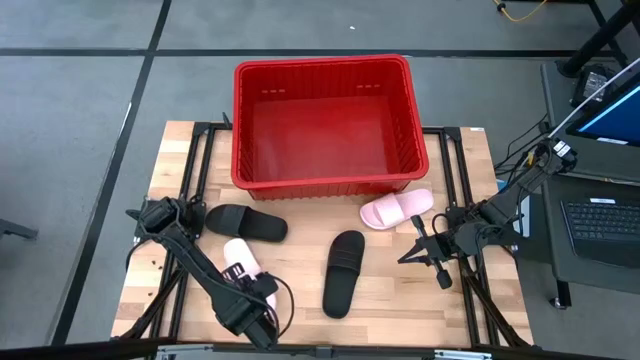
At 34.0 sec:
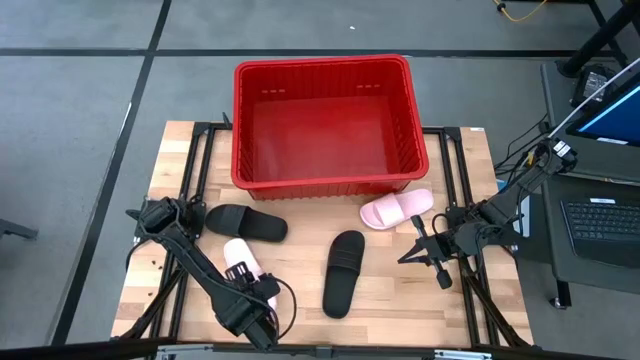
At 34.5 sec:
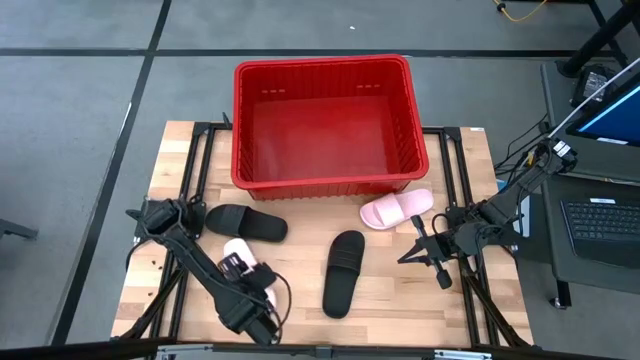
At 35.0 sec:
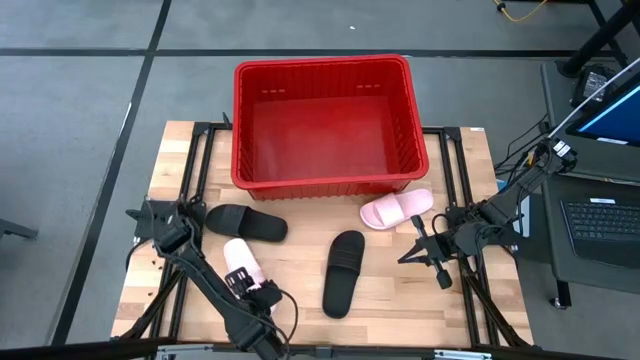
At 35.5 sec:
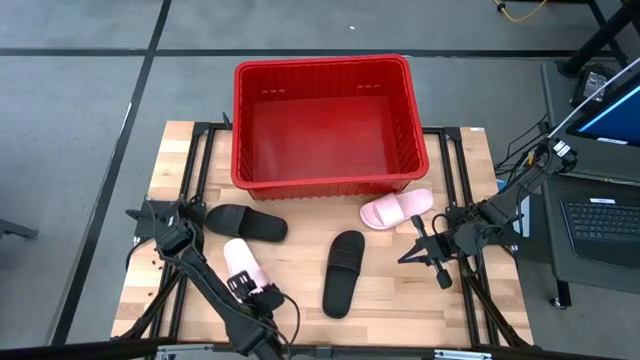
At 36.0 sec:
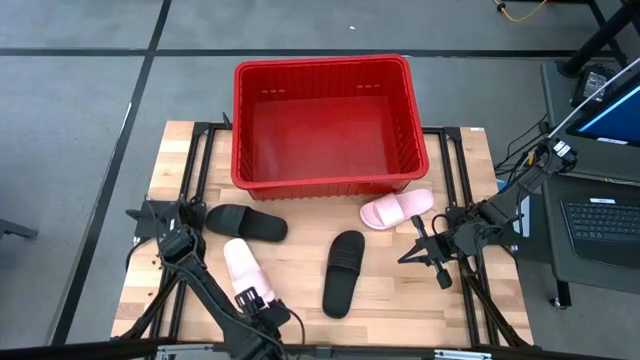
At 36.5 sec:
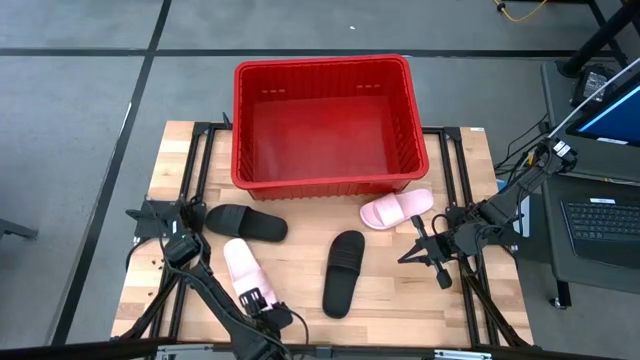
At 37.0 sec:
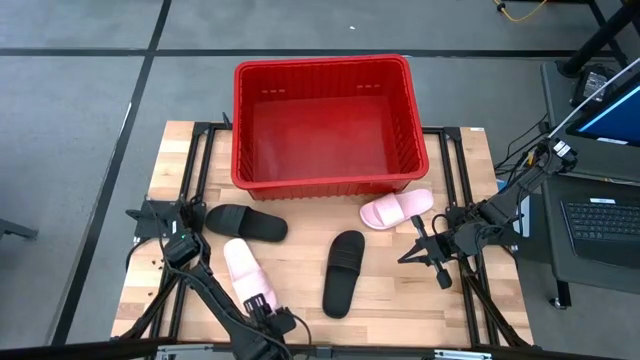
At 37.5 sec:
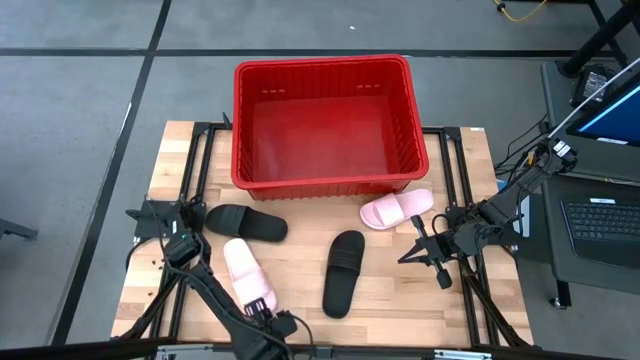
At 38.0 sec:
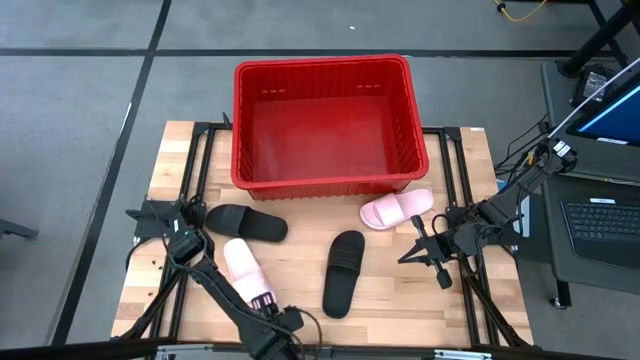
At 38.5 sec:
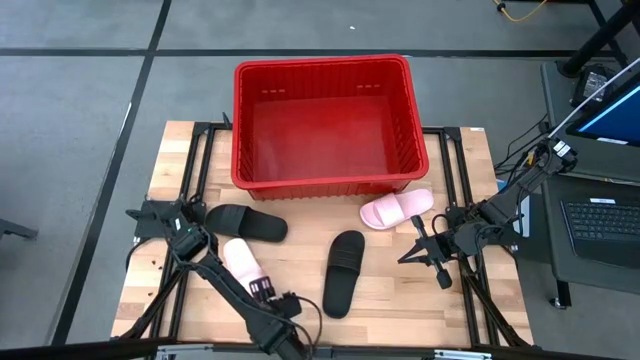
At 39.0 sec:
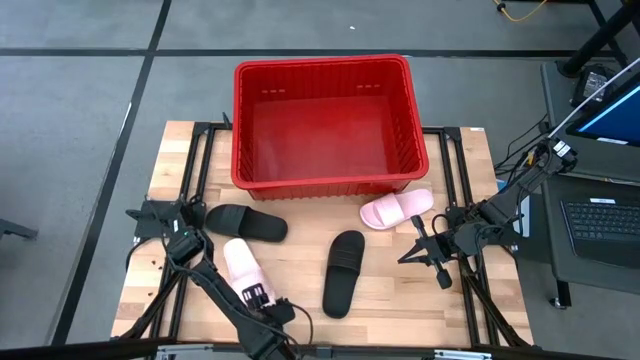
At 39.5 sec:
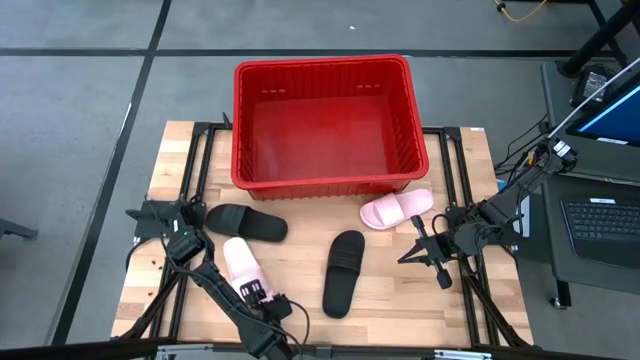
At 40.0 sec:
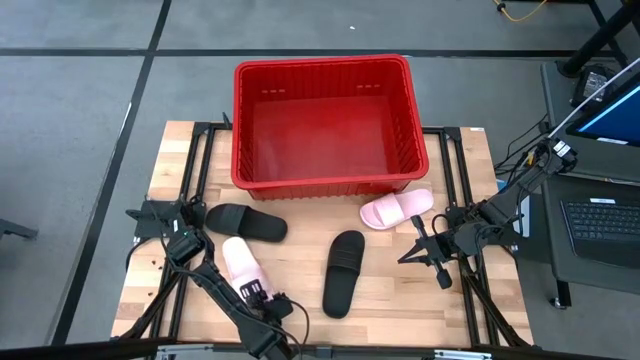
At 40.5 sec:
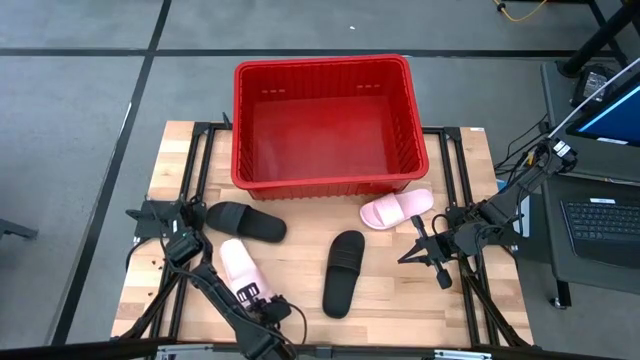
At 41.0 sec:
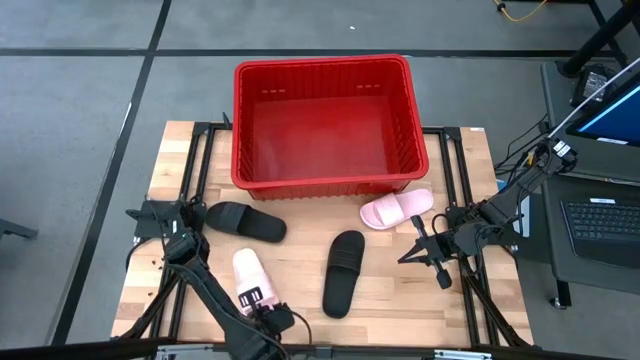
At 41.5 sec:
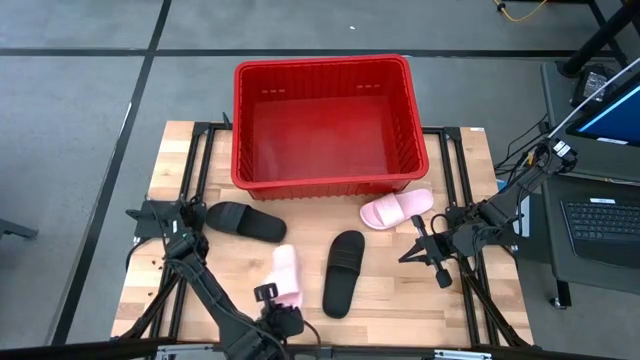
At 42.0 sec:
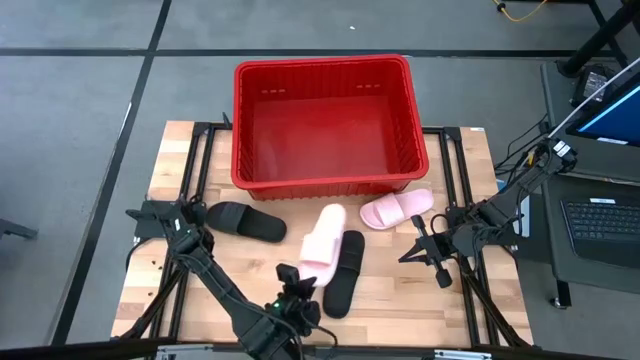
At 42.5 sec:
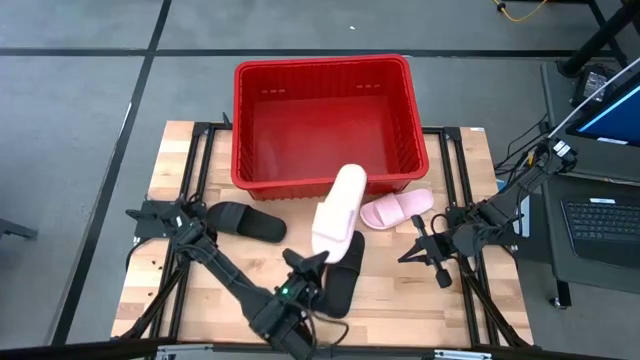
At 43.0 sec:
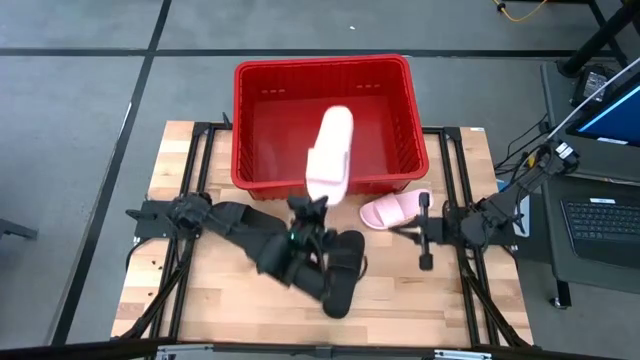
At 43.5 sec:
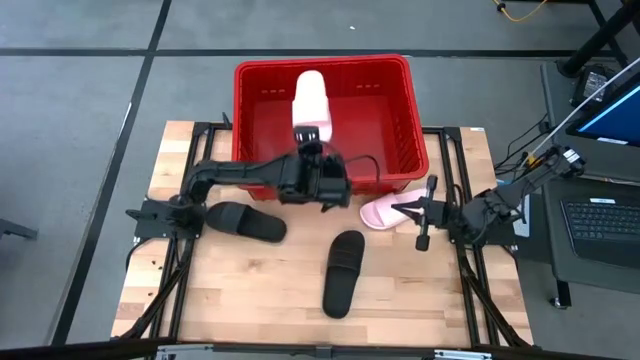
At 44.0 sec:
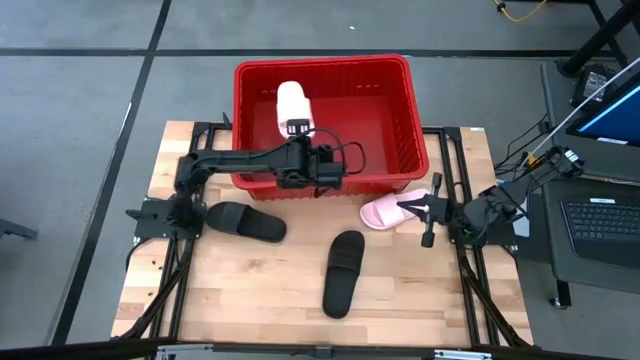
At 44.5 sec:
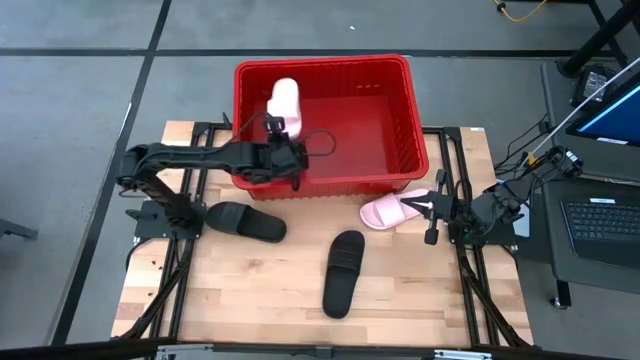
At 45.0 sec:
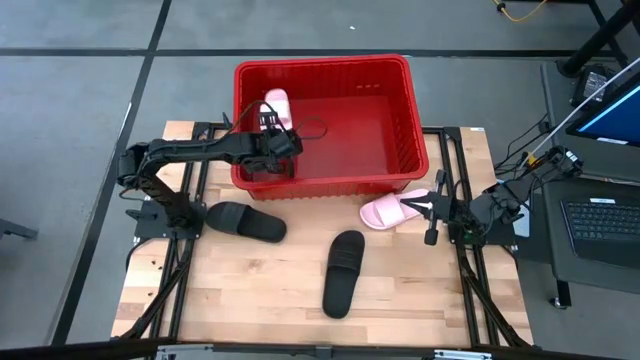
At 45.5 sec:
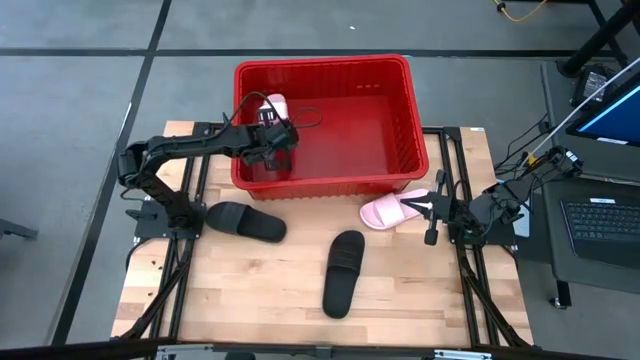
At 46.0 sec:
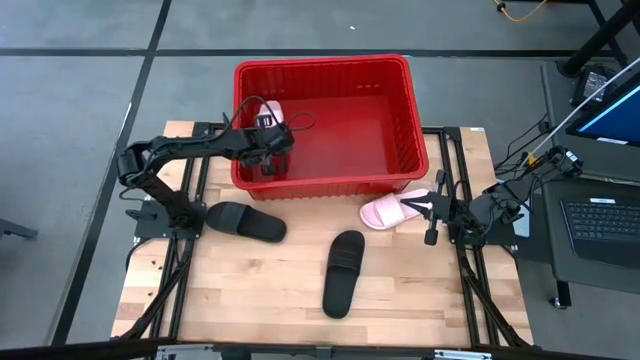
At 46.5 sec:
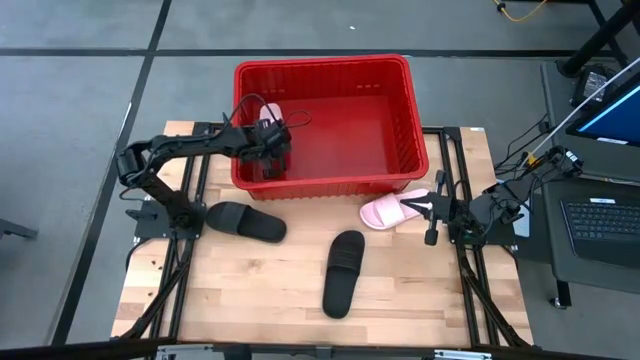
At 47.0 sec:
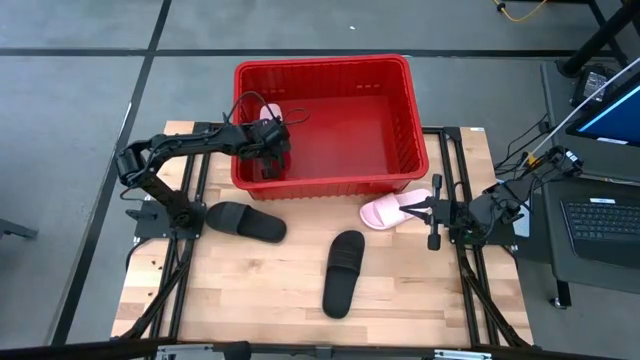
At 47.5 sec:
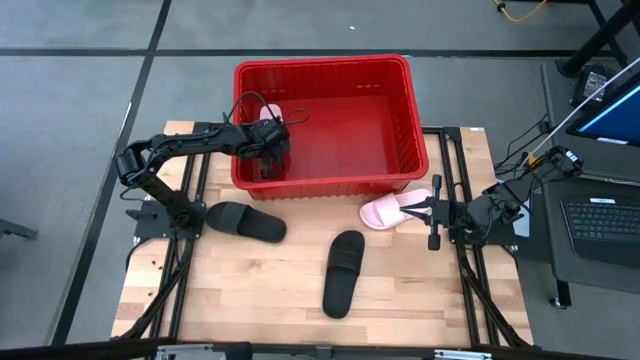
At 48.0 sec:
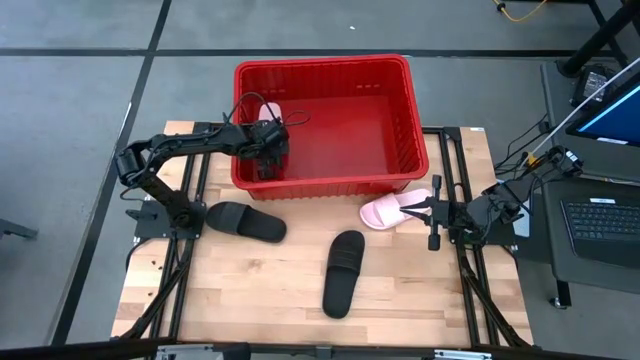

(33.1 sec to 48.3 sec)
Task: Pick and place slides into bin
Put the top pink slide into the red bin

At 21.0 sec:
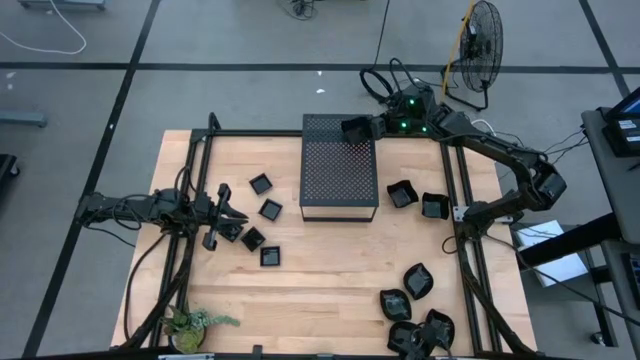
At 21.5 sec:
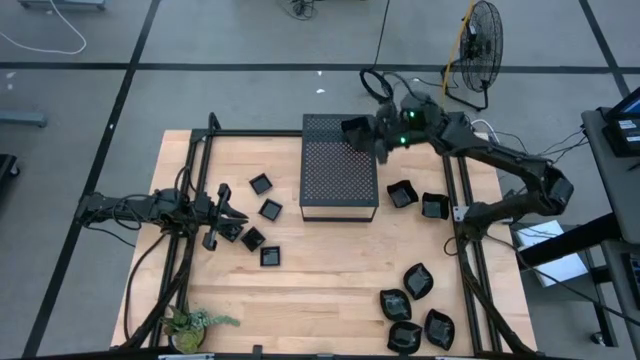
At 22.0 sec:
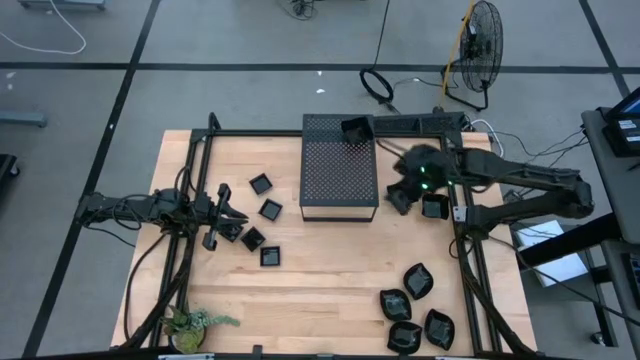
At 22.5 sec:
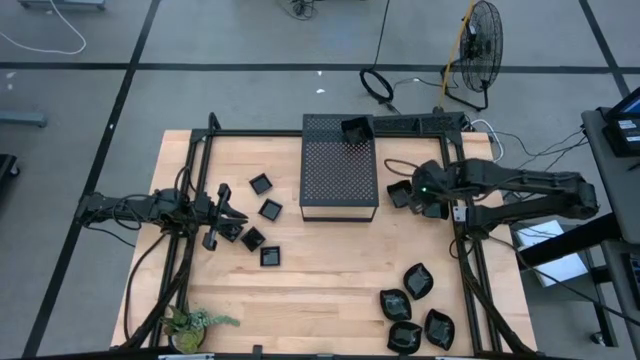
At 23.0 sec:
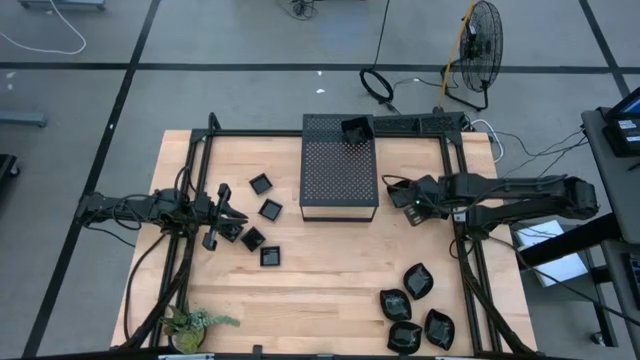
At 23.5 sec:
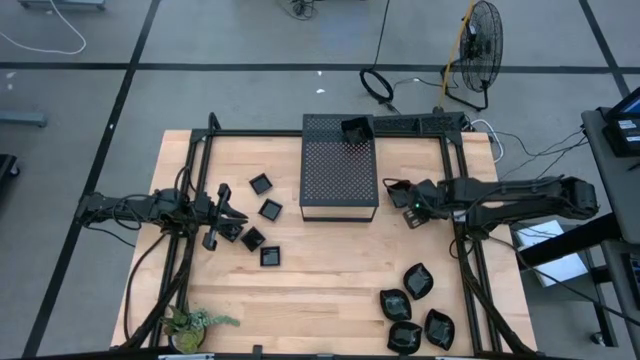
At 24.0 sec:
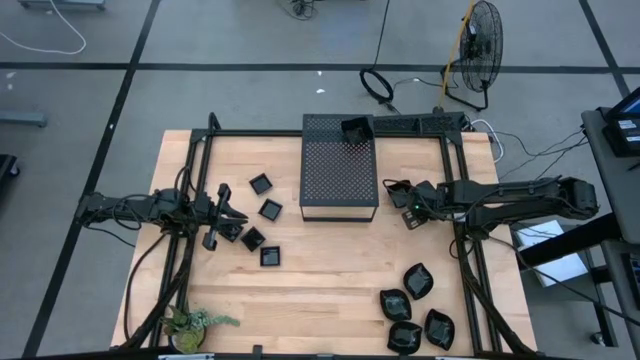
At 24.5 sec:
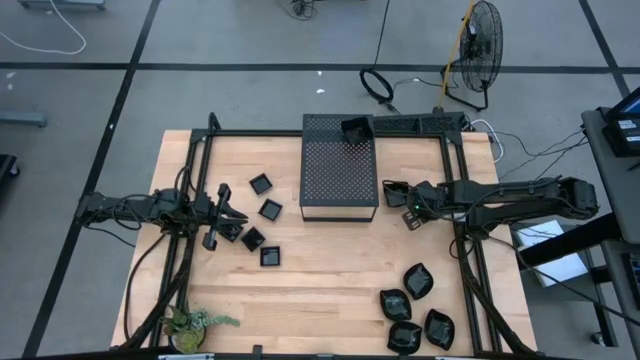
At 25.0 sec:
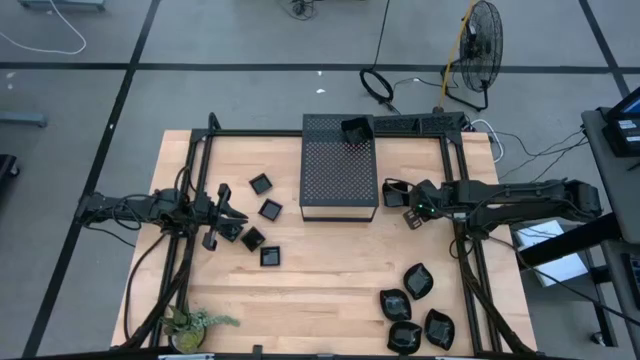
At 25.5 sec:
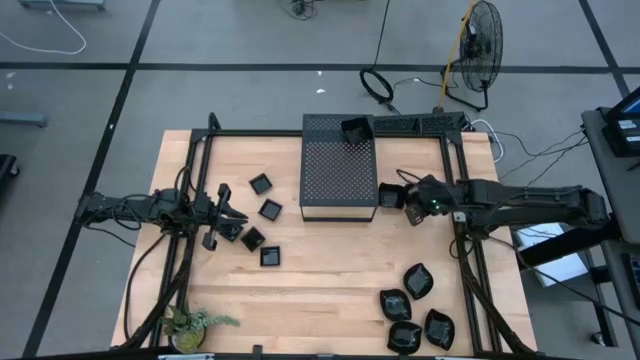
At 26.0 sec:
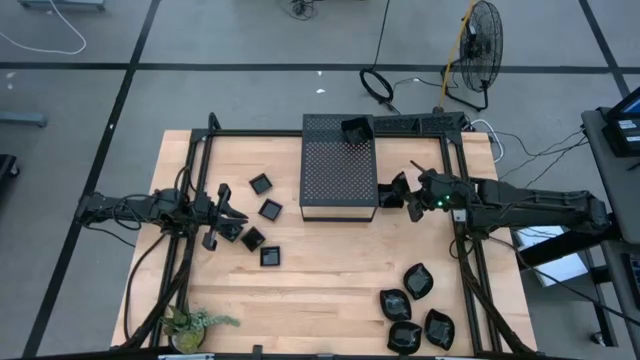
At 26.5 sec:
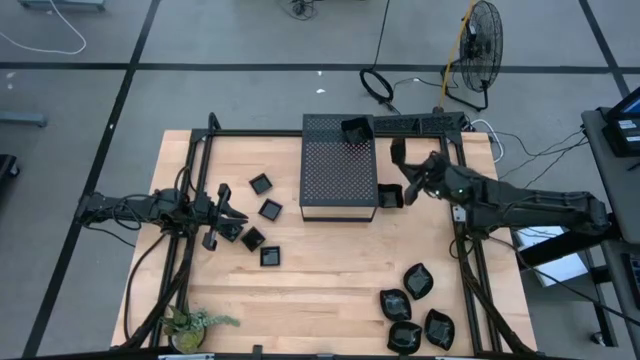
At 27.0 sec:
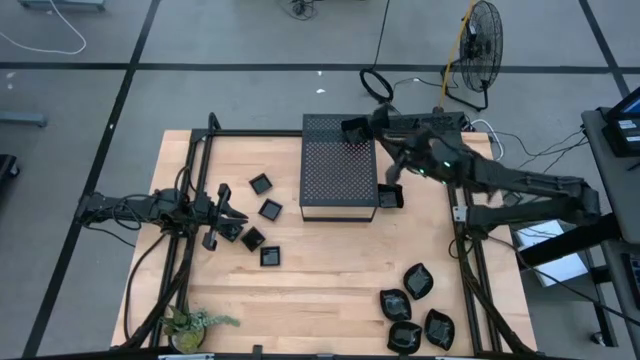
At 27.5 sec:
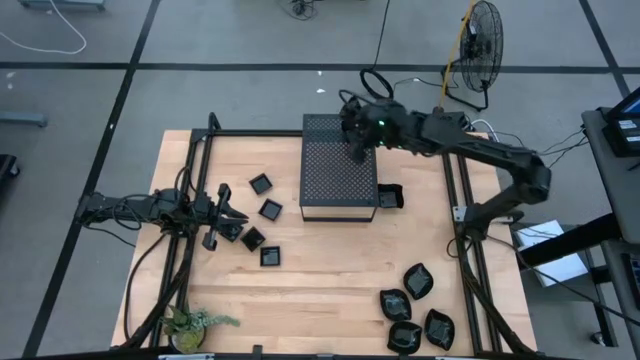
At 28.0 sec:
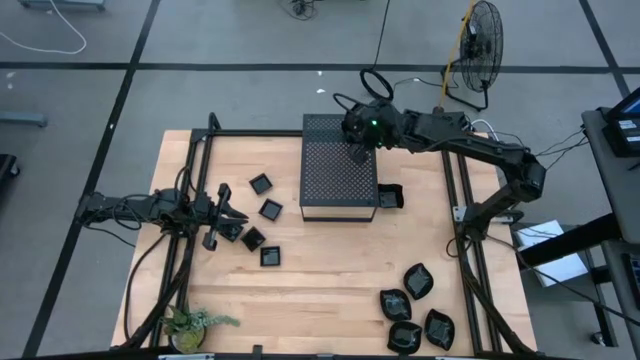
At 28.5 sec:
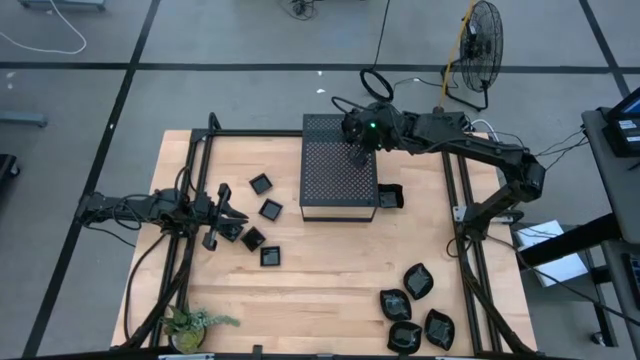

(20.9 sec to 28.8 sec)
Task: Pick & Place Mini shaped plates
Stack the distorted square plate on top of the distorted square plate on the shelf
